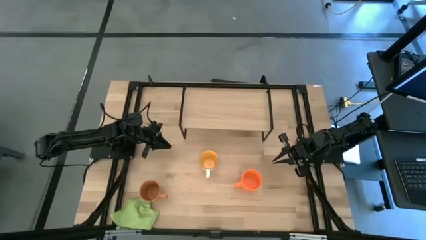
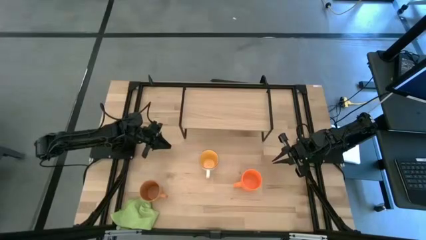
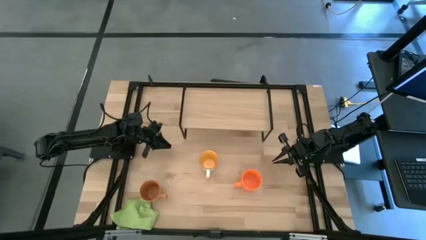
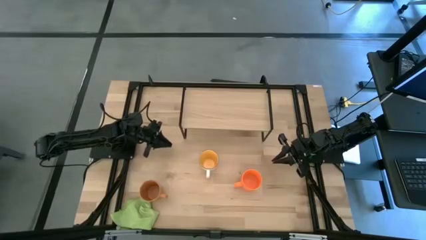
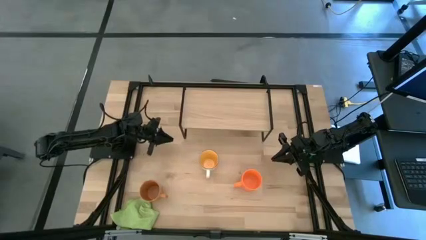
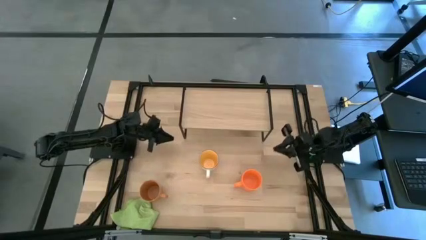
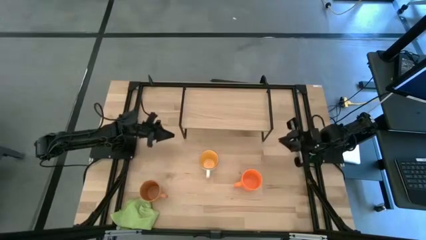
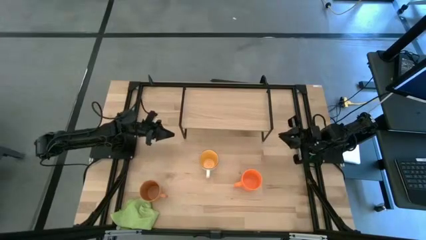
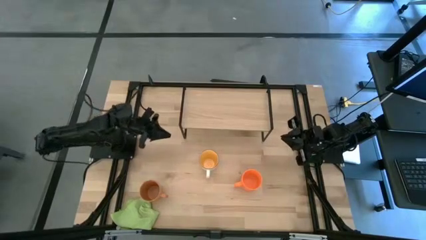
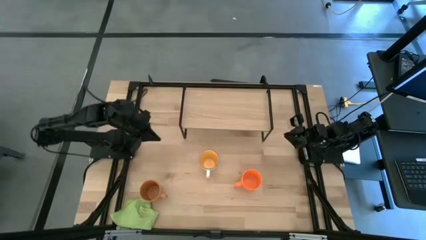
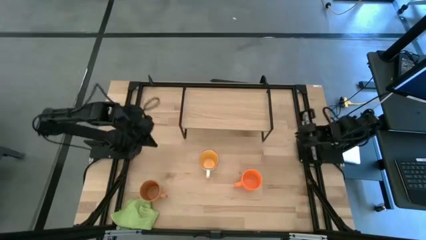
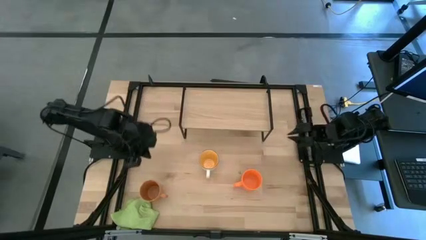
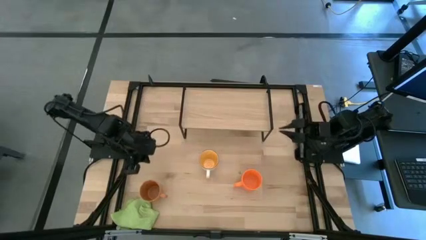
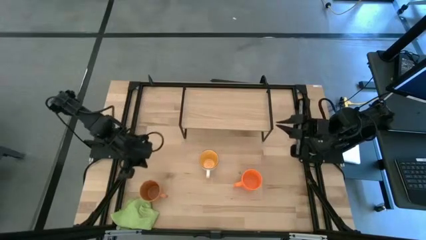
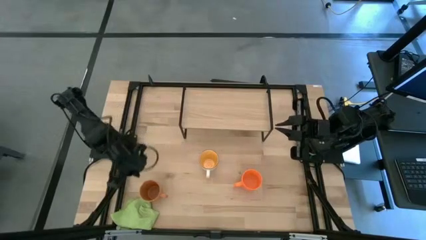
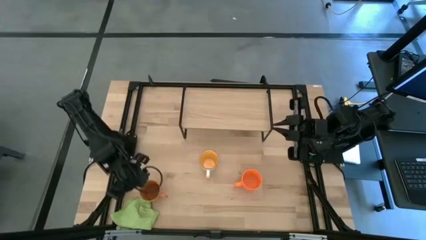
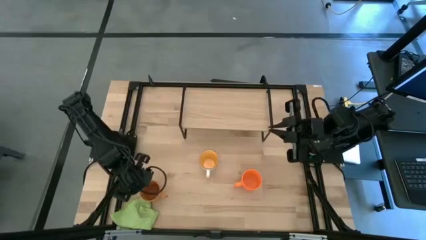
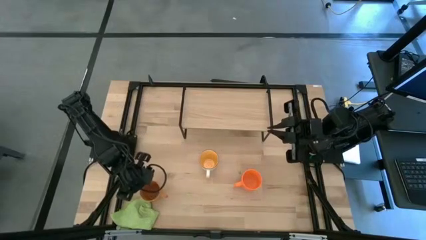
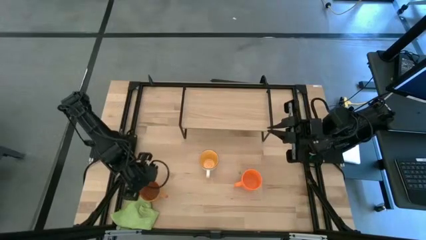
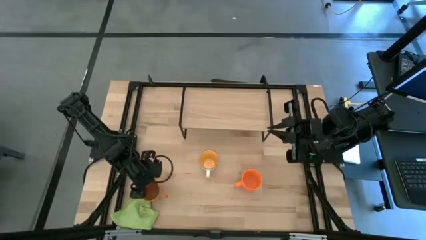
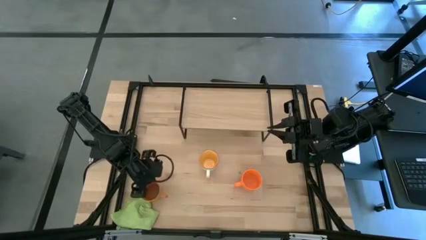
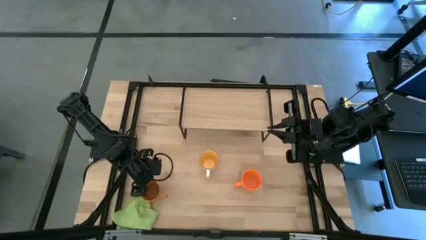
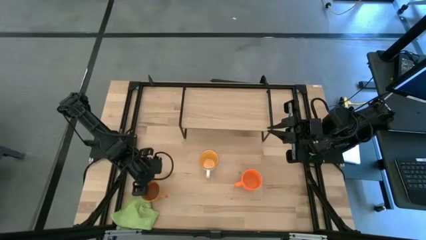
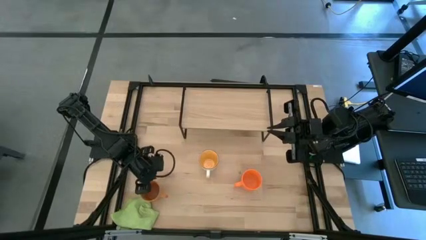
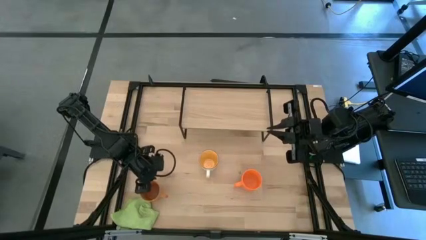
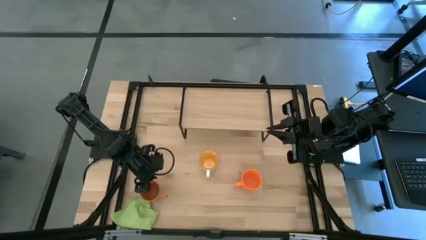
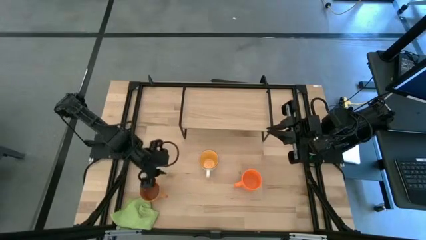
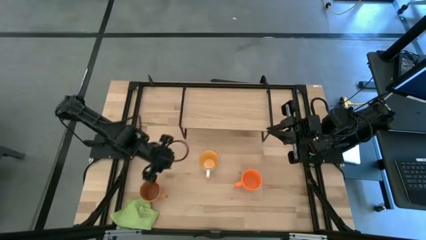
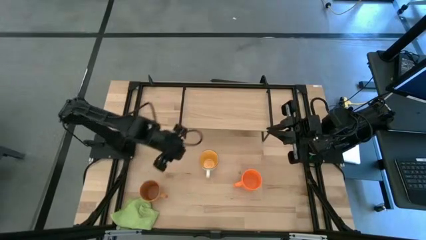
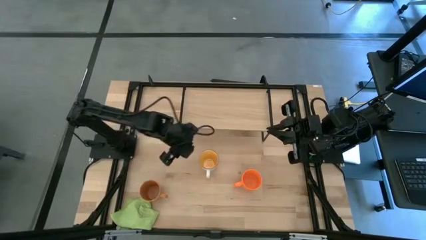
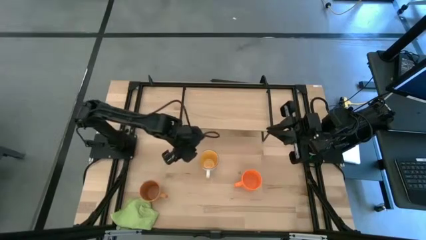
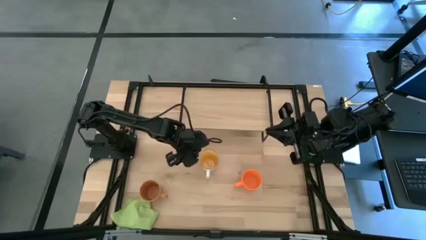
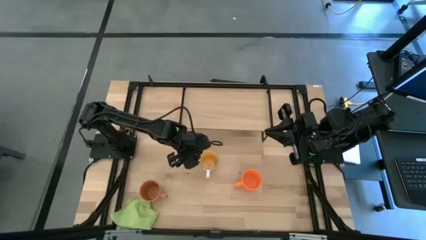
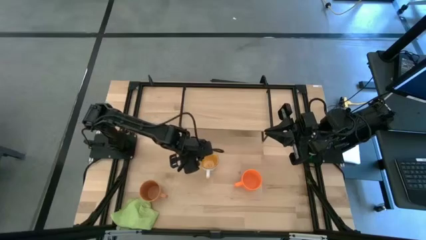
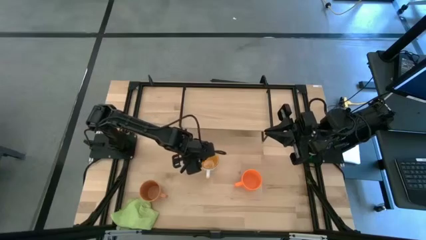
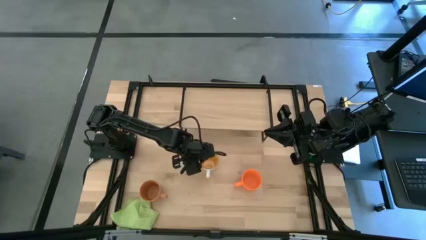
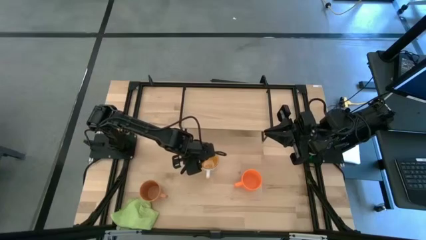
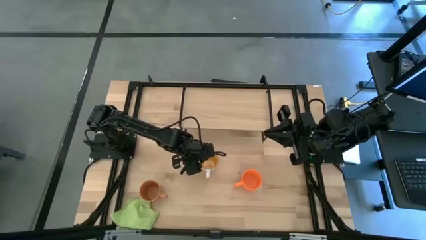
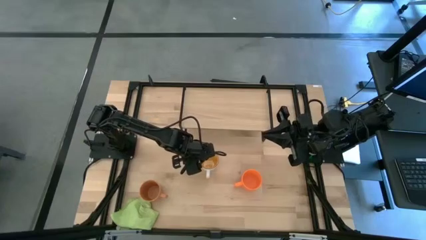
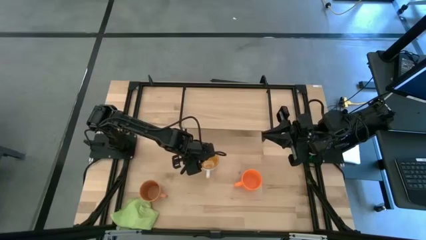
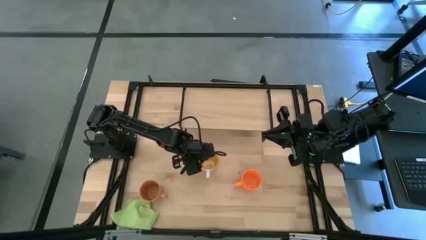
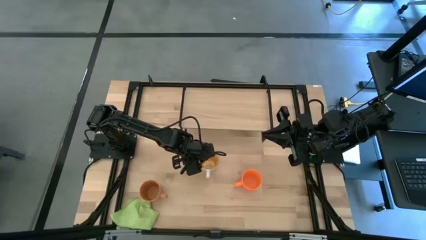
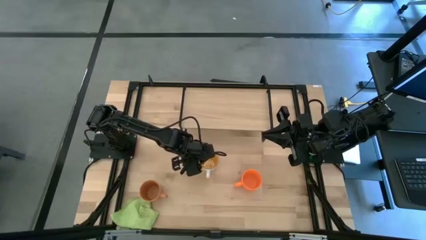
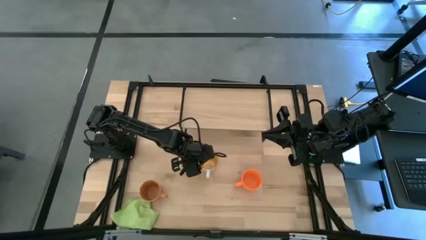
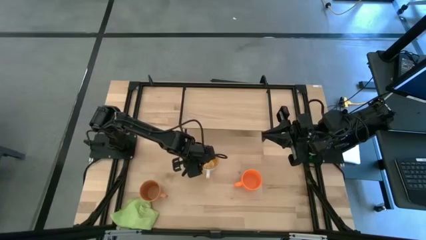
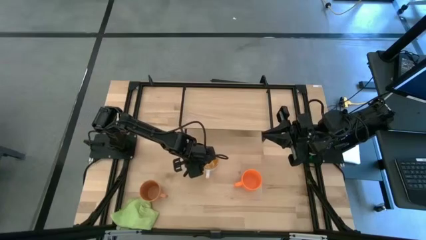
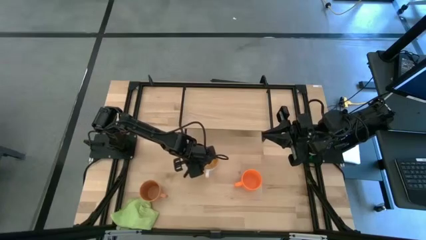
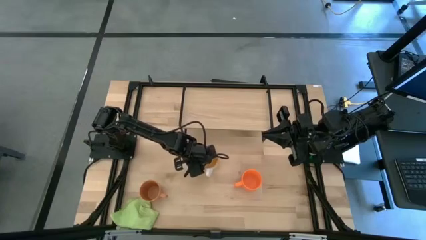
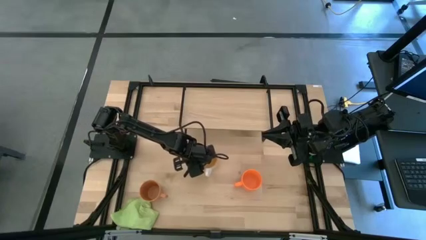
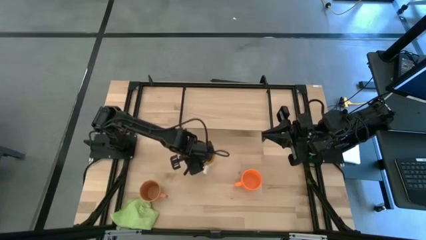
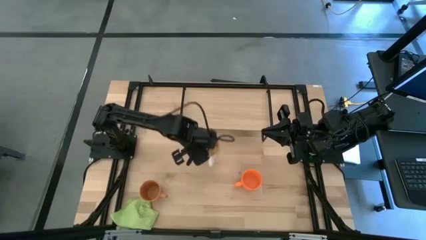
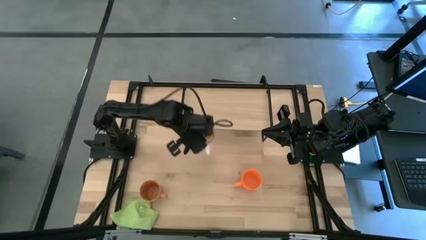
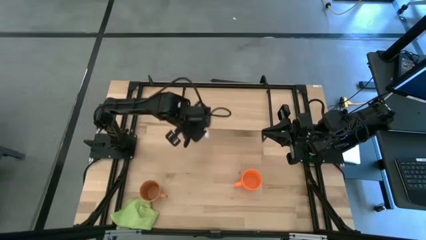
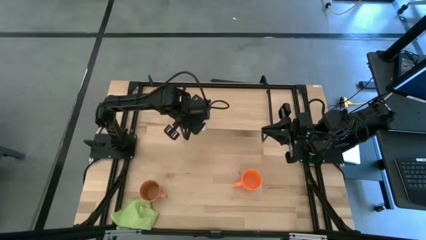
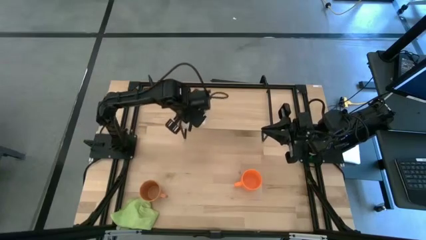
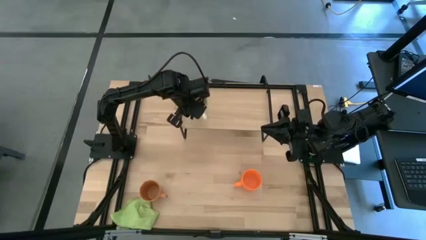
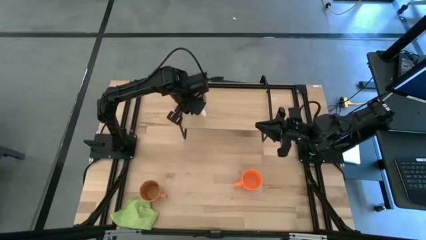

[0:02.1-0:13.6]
Task: Stack small to large cups/mugs on shelf
Put the yellow mug on the shelf

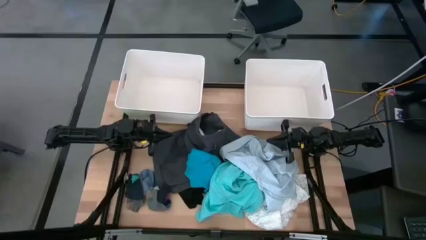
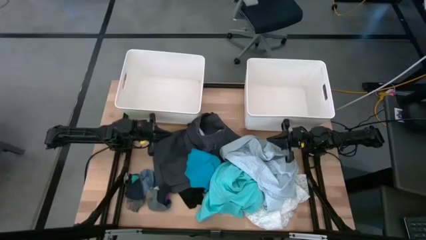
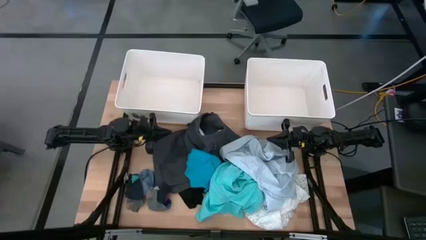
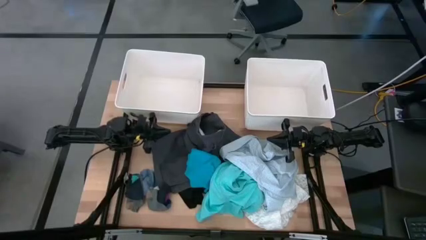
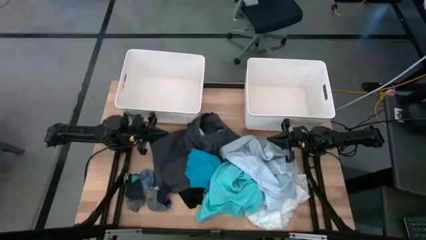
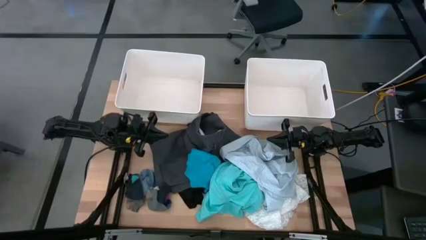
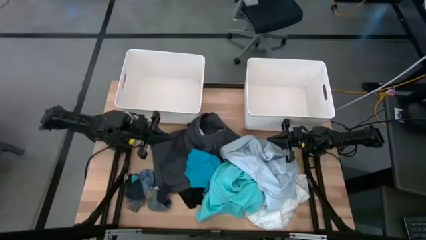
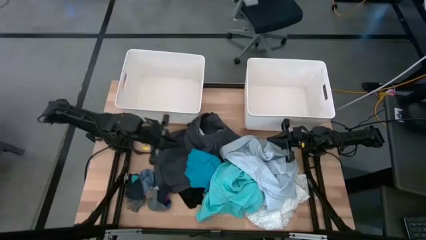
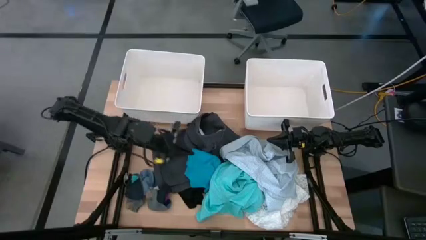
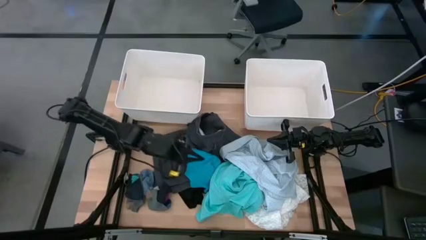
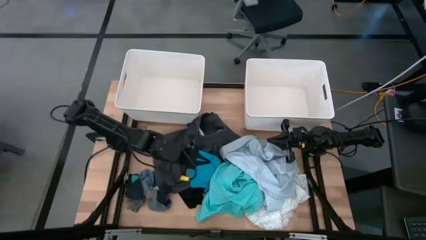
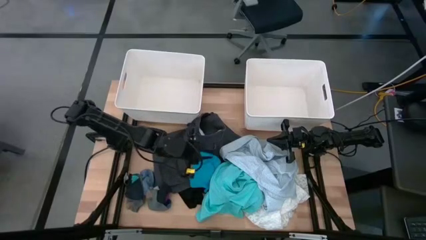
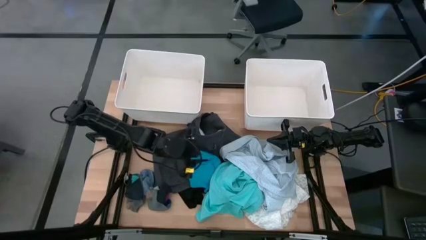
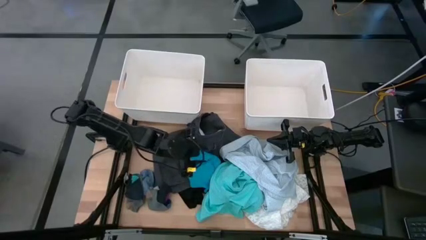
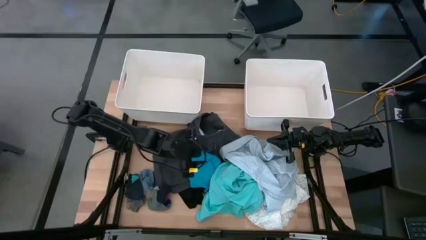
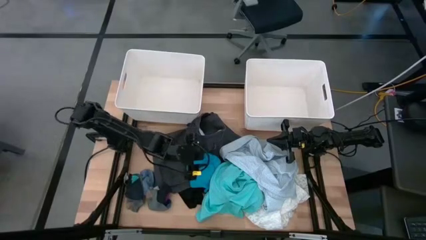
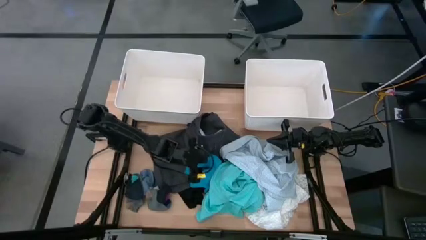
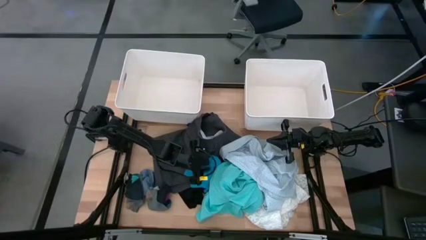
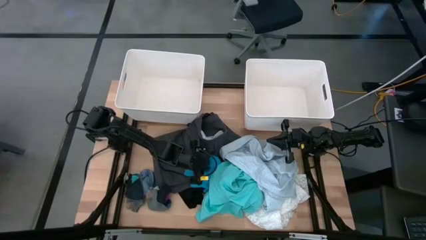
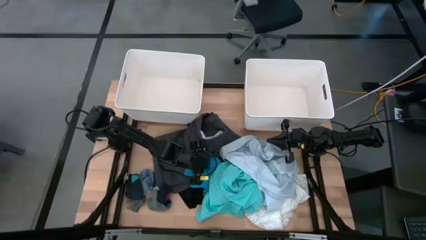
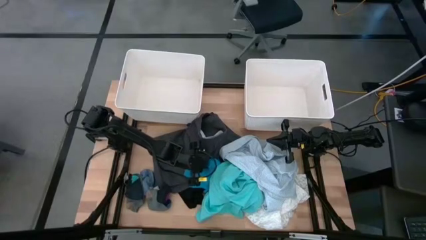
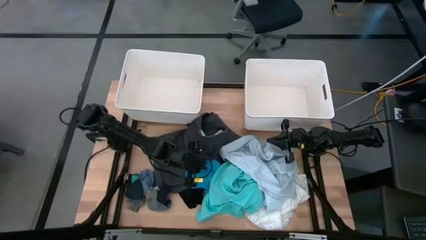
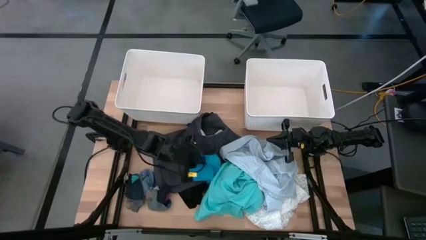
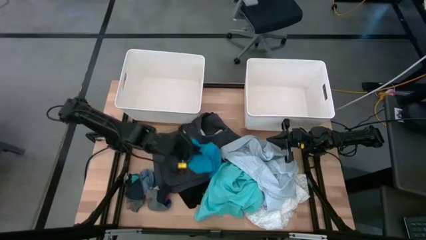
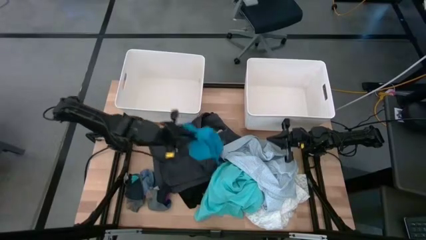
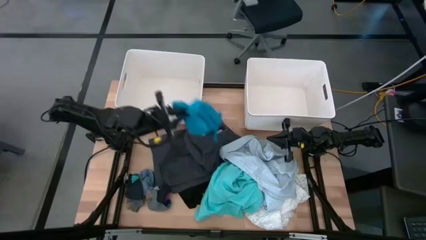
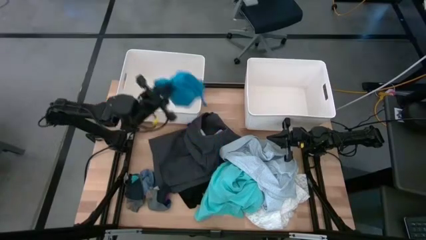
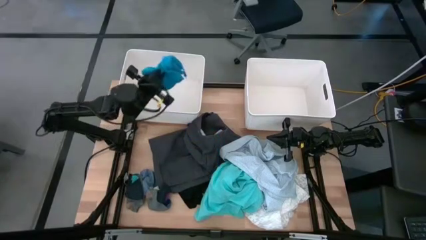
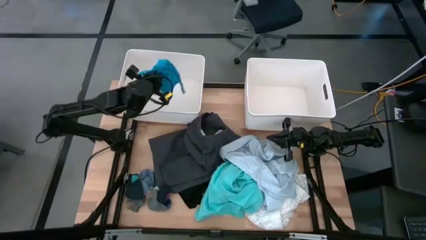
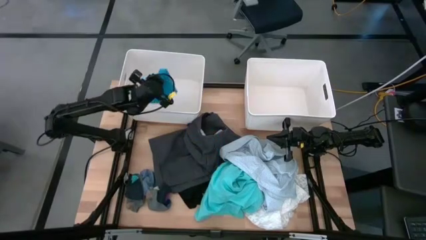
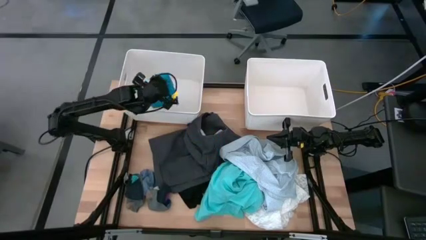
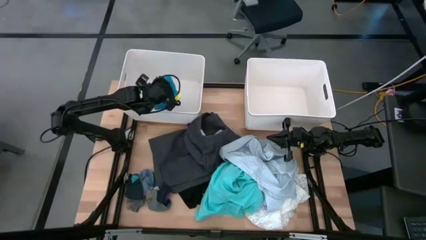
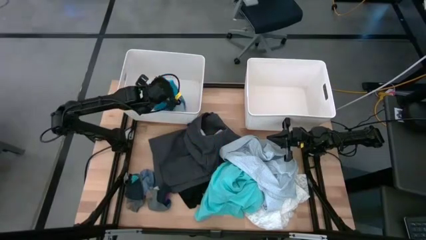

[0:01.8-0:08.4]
Task: Sort clothes
Put the blue shorts into the left white laundry bin
